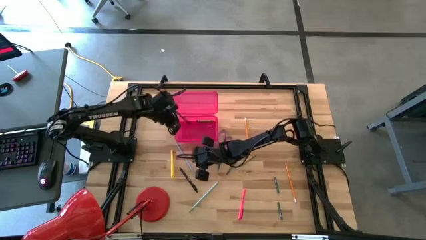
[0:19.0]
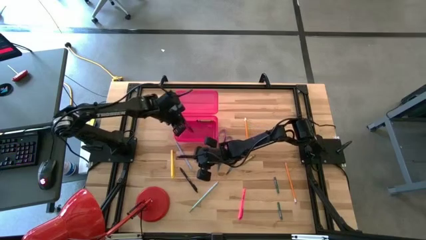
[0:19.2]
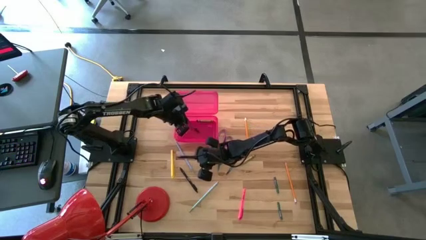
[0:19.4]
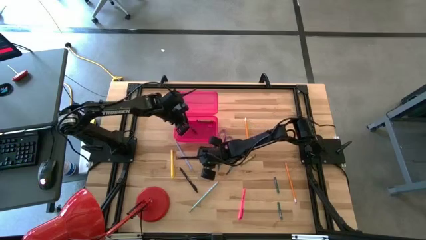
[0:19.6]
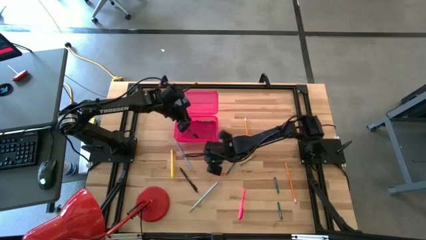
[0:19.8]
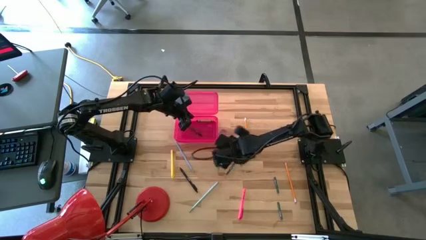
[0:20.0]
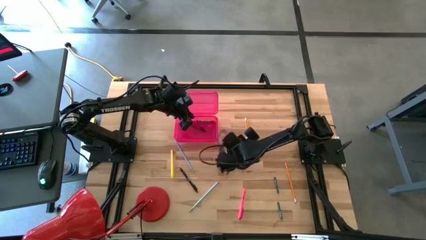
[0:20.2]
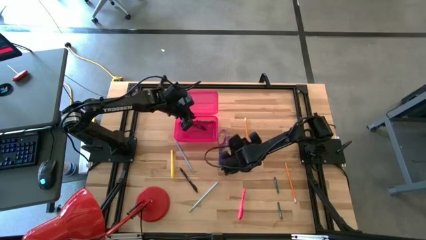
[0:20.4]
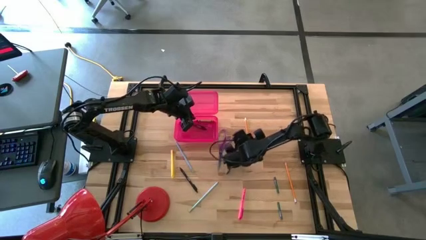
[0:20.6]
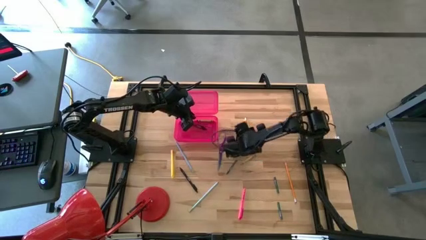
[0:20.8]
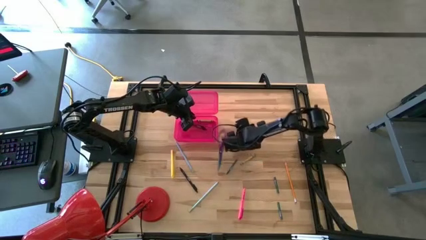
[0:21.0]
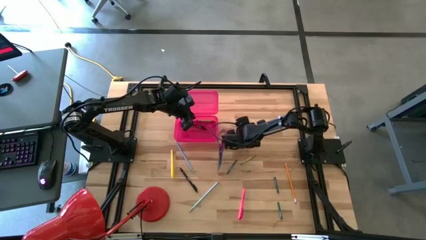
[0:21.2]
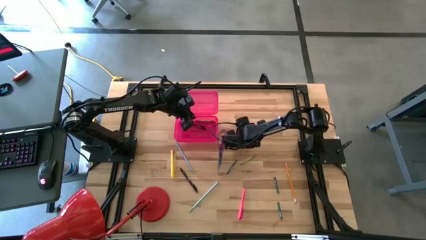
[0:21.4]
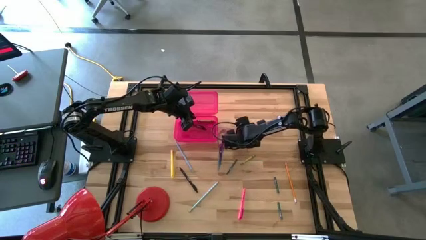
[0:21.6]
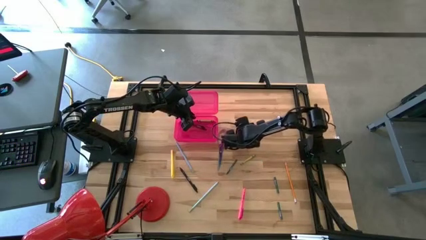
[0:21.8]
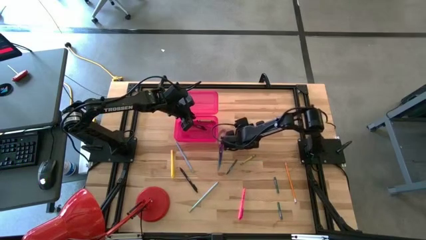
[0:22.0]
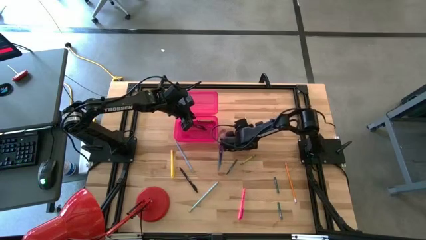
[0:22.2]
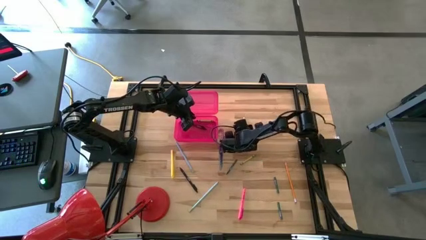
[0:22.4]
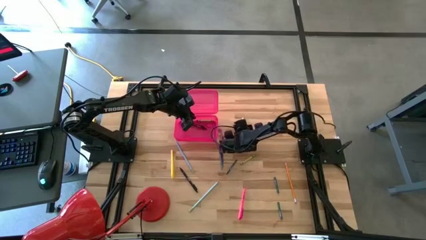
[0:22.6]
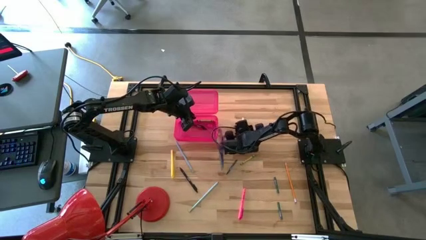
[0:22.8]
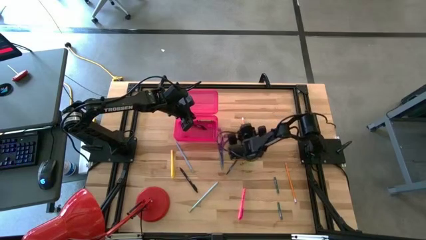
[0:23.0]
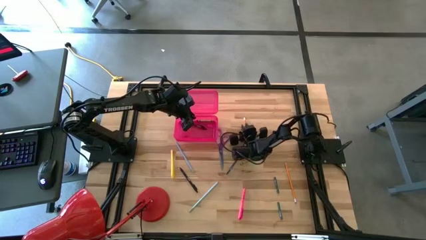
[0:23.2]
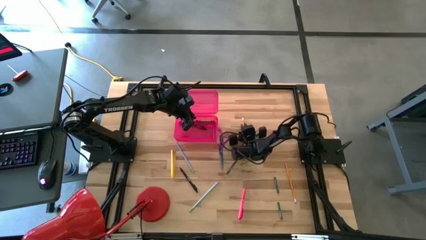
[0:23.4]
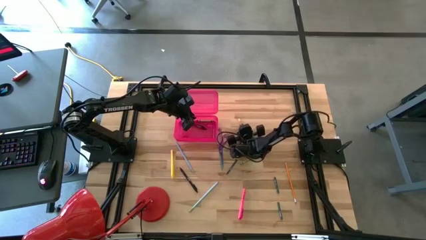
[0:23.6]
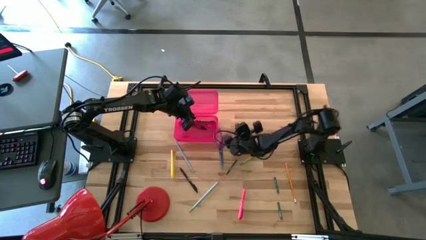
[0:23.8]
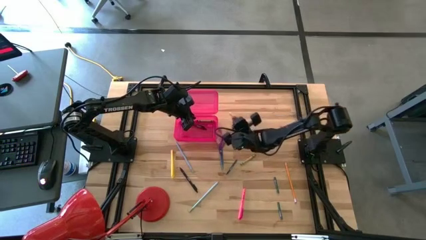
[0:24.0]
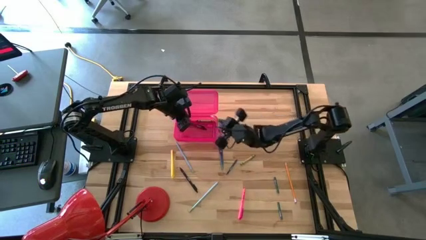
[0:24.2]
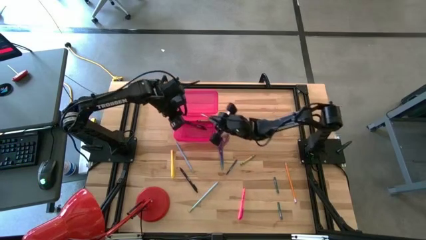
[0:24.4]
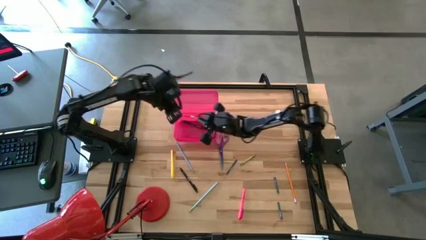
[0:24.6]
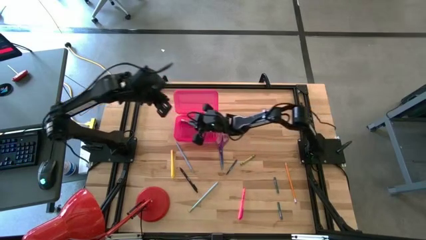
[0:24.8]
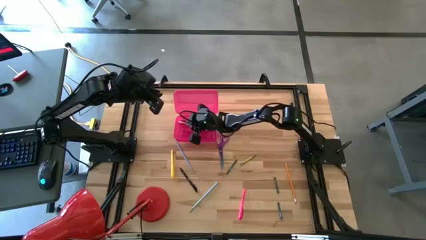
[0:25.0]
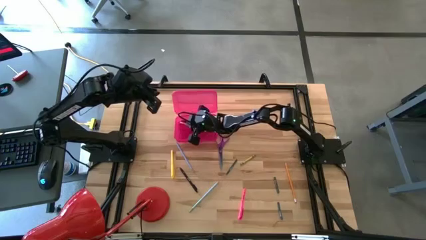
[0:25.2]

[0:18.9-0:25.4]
Task: Pick & place school supplies into a supply box
Put the top yellow pencil into the pink supply box

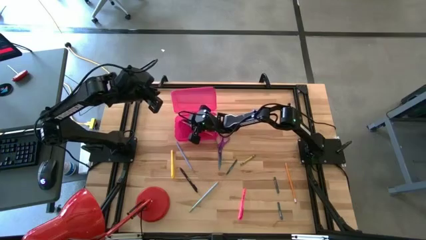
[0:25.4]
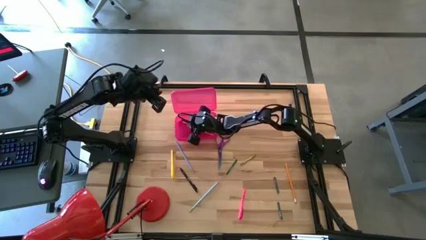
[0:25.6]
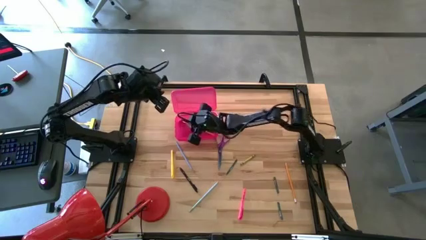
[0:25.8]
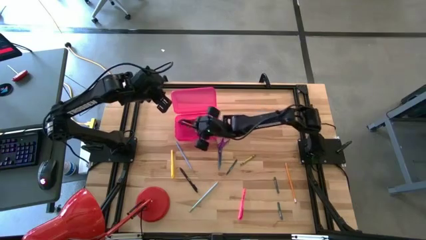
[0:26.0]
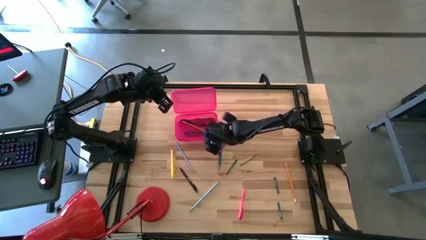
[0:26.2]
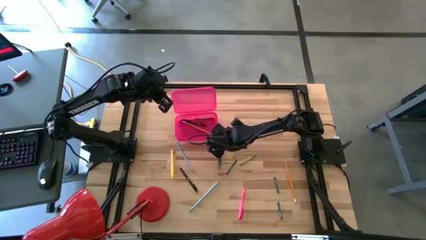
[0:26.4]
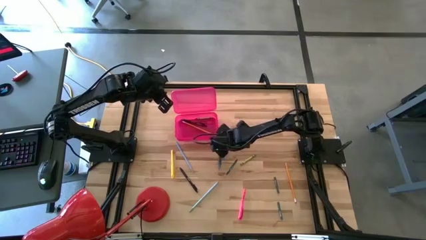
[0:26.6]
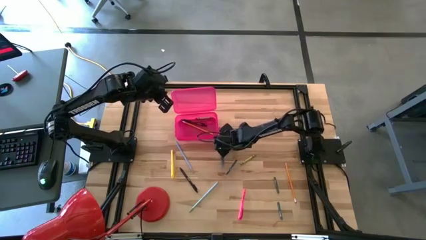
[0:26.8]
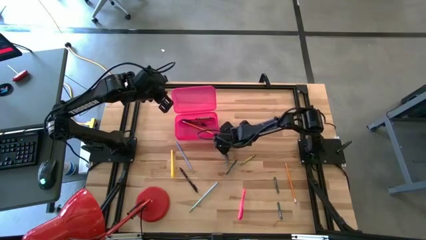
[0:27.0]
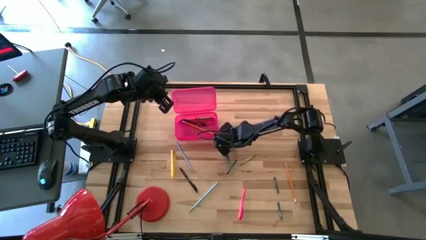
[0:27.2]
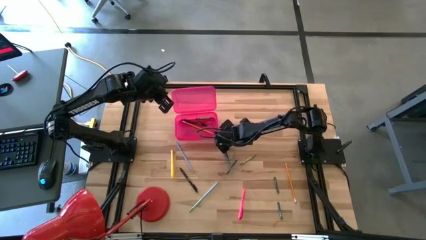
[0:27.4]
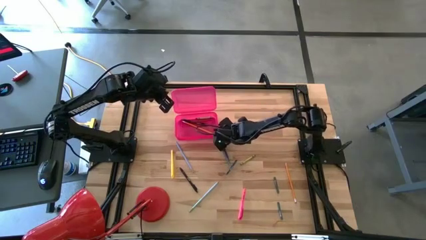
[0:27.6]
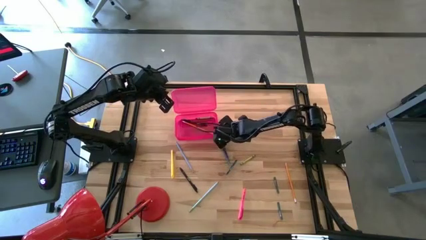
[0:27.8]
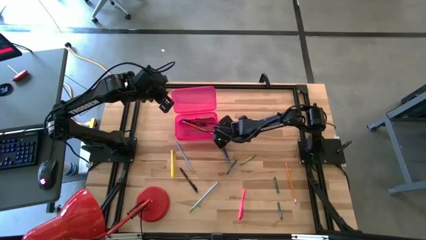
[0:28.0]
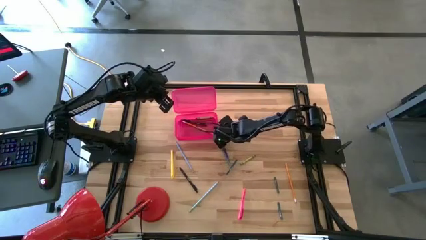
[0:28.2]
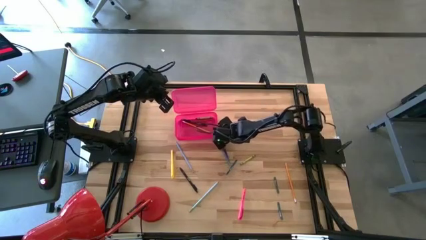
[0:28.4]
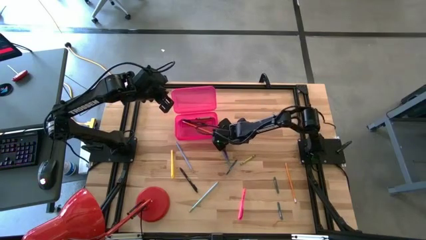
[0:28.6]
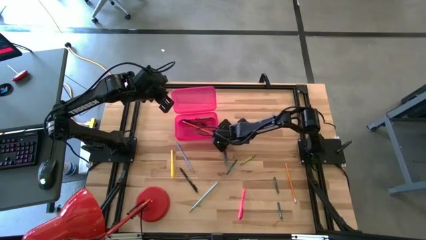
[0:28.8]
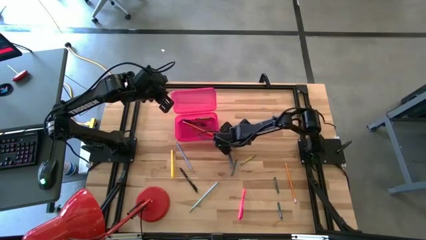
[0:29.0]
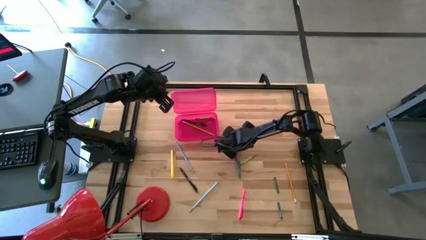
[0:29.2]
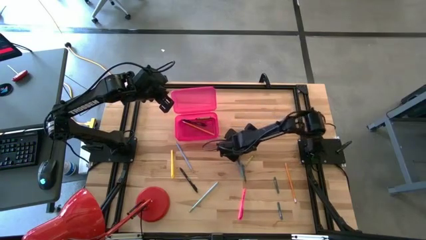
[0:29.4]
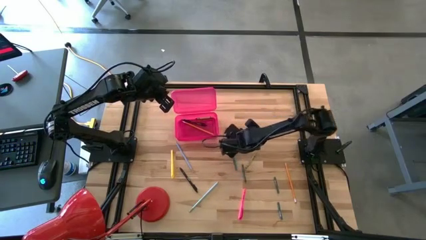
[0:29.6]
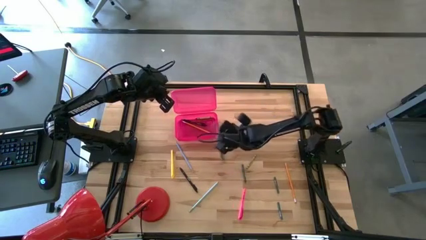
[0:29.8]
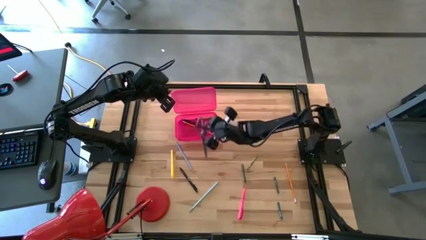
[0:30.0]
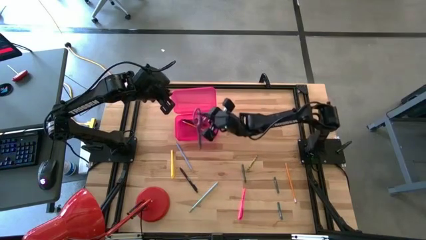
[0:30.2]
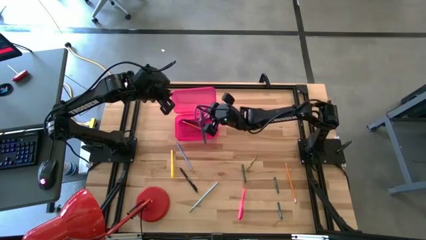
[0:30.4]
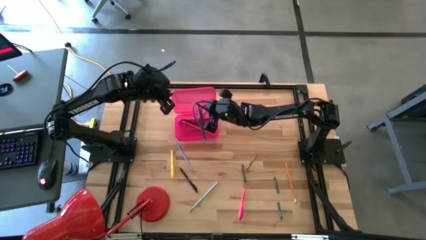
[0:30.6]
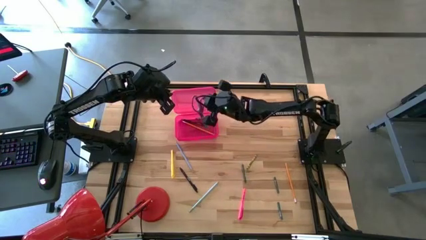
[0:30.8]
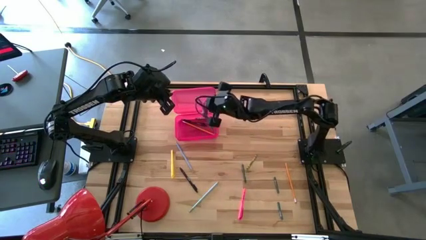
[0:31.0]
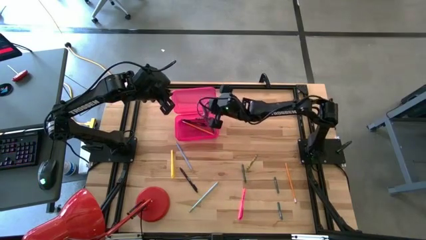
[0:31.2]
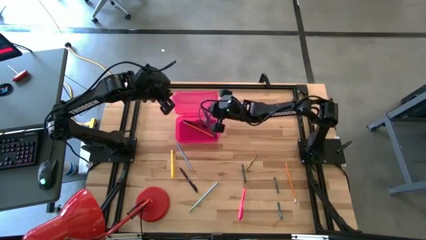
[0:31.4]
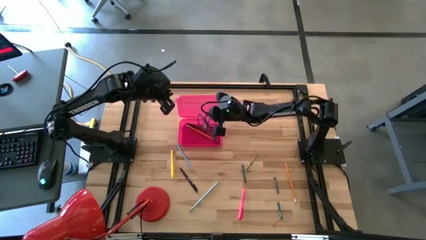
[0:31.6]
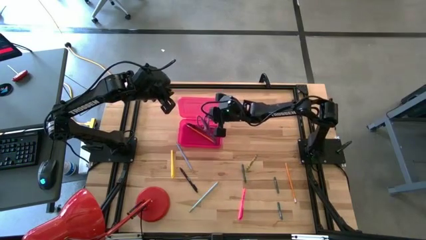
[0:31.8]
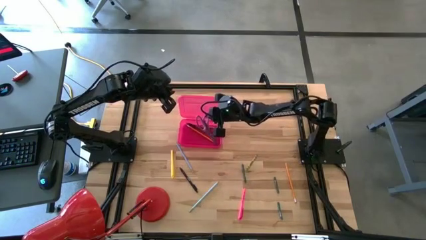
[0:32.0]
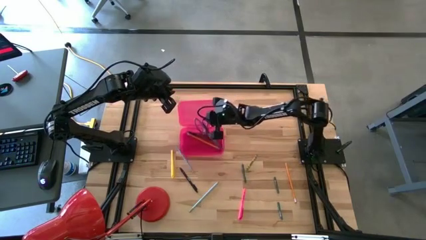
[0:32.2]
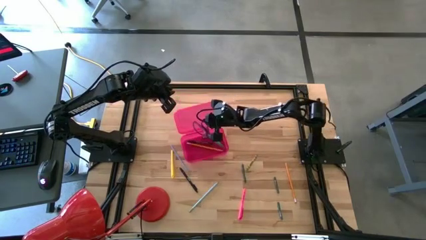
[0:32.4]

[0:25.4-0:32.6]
Put the purple scissors into the pink supply box

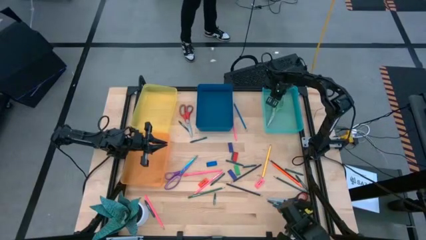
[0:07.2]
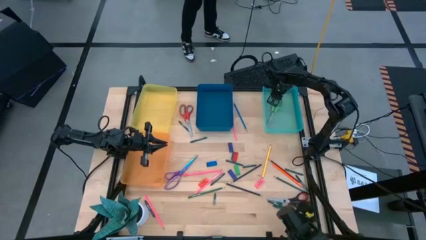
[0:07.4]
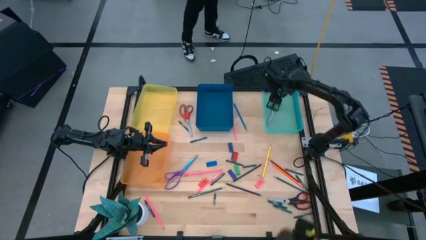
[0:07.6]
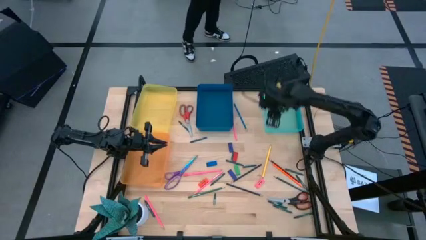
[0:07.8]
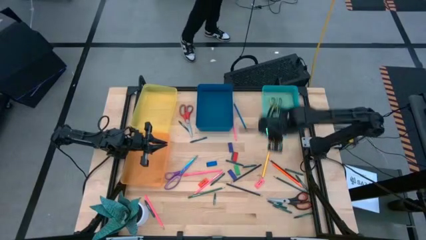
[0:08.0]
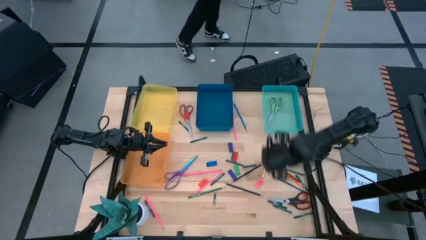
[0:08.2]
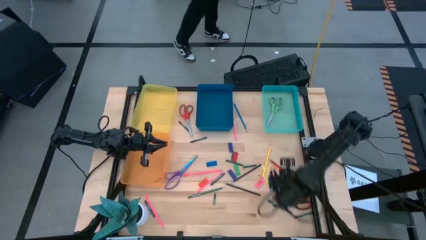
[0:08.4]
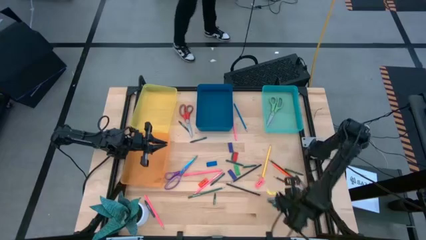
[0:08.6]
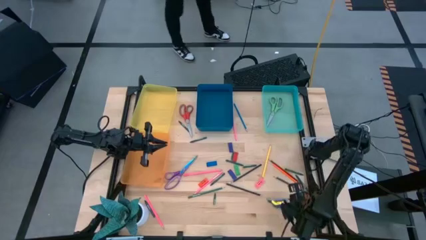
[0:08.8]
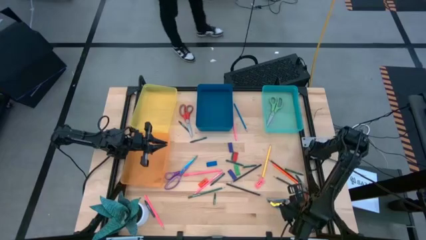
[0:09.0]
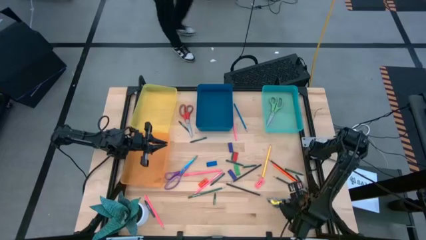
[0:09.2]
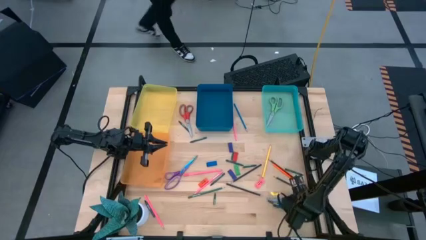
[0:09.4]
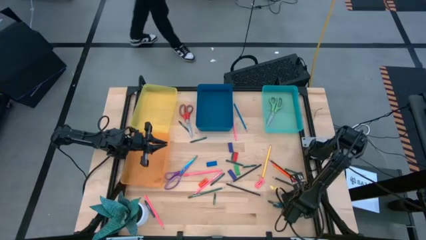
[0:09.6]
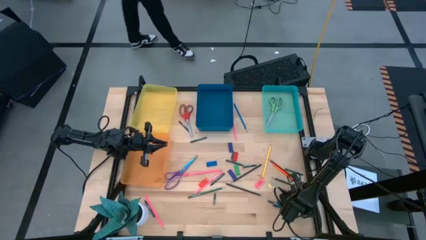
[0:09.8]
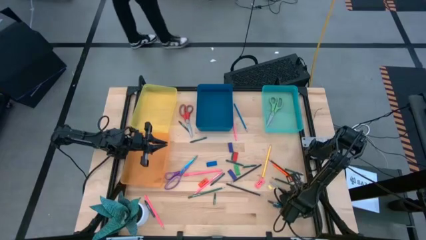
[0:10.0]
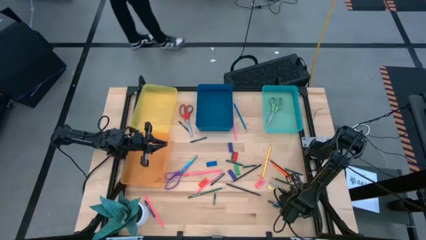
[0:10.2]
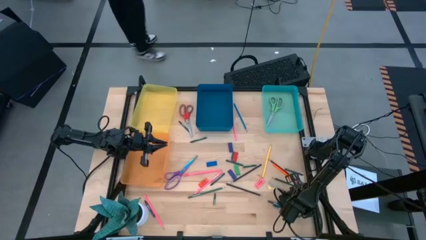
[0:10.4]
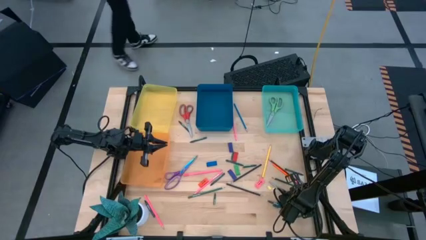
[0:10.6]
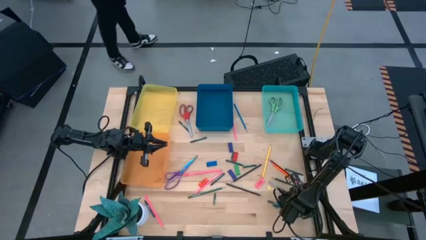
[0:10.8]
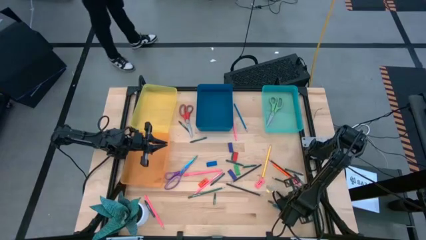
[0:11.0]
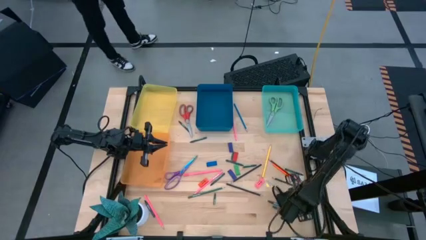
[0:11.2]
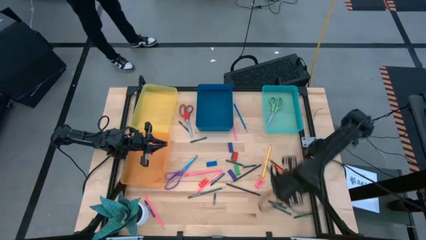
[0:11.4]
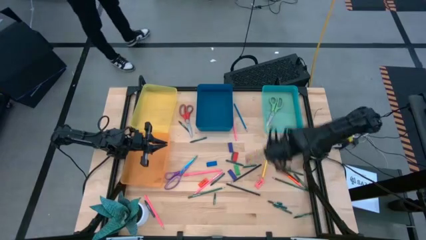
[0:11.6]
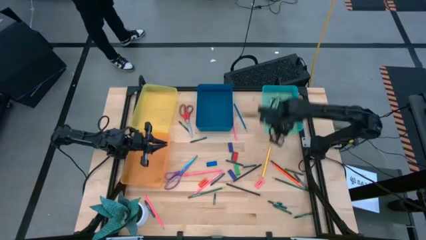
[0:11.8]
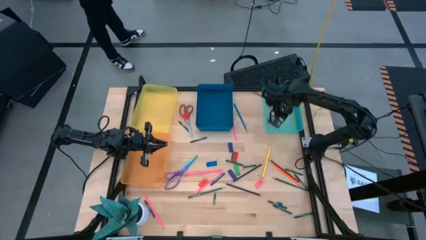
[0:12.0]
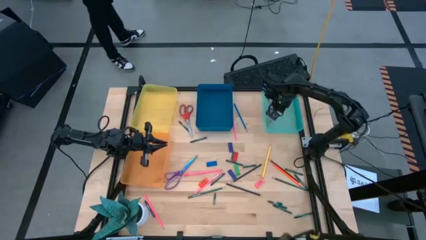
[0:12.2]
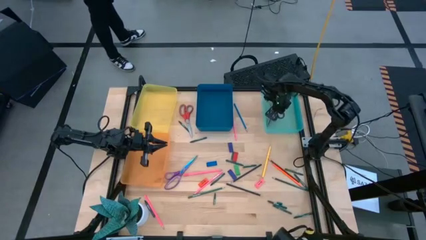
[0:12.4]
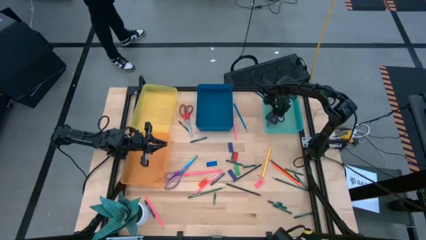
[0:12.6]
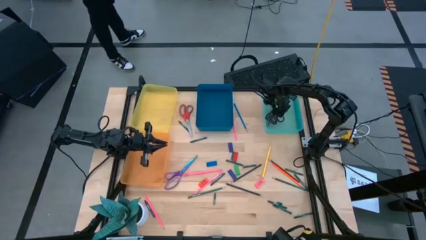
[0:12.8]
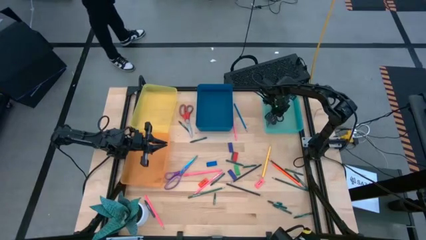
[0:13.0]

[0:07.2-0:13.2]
Task: Sort crayons/erasers/pens/pencils in bins
Put the black scissors into the light blue bin
